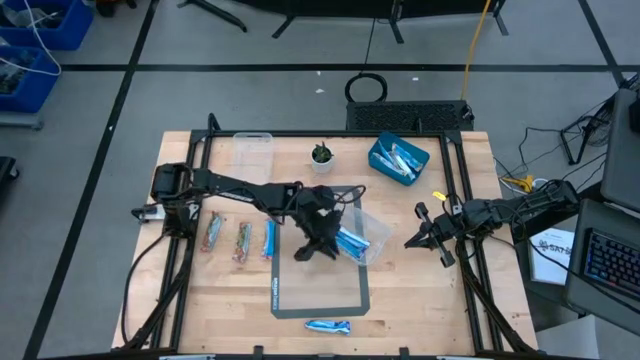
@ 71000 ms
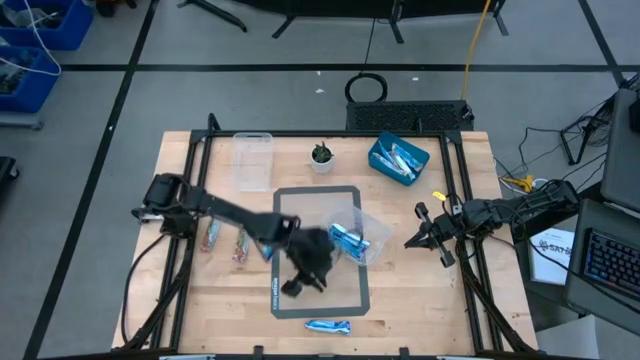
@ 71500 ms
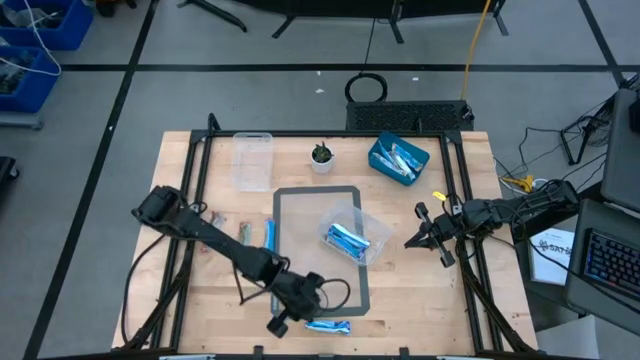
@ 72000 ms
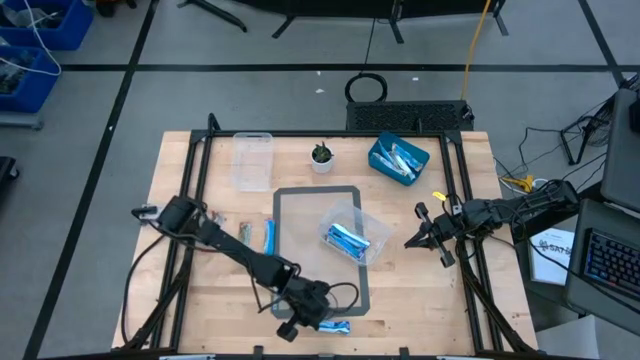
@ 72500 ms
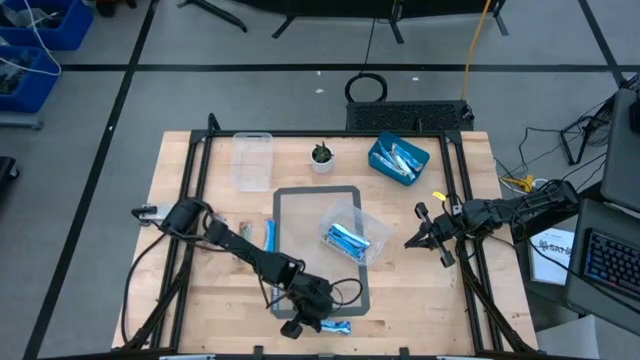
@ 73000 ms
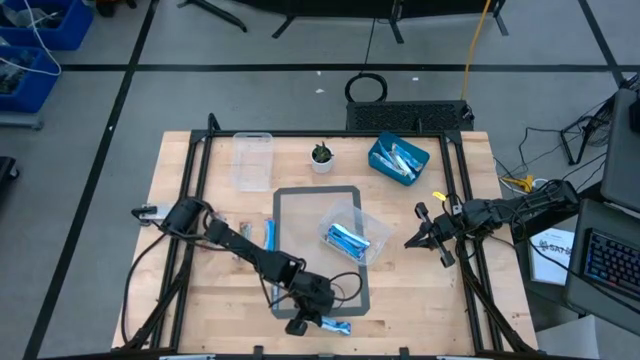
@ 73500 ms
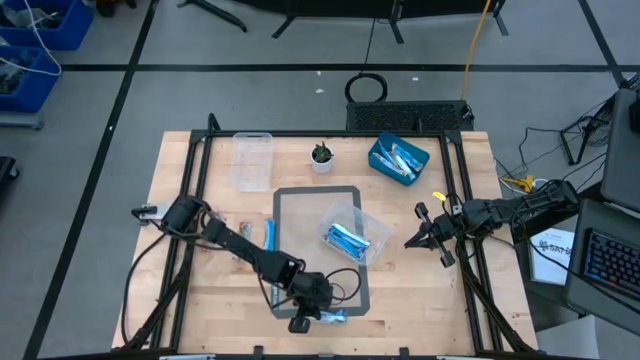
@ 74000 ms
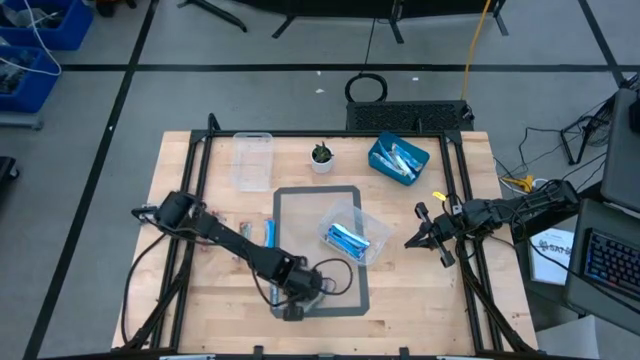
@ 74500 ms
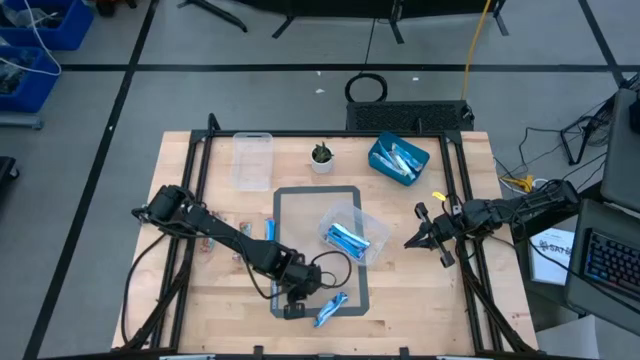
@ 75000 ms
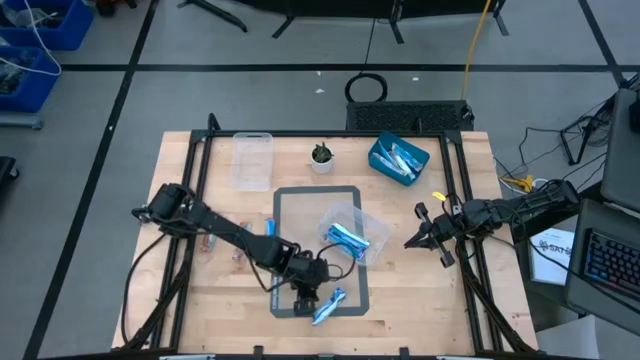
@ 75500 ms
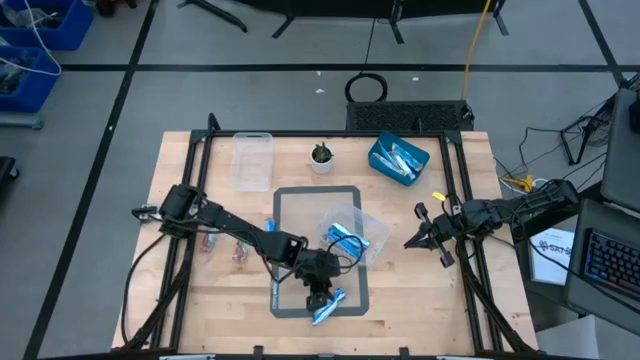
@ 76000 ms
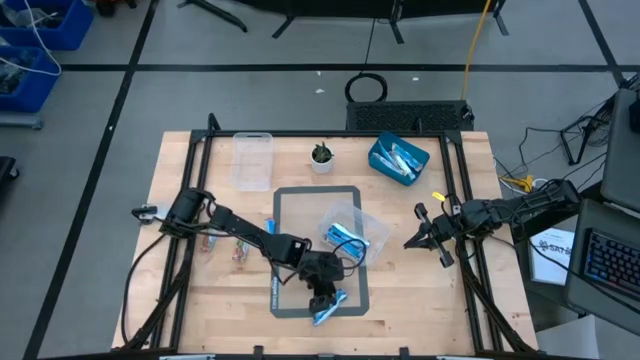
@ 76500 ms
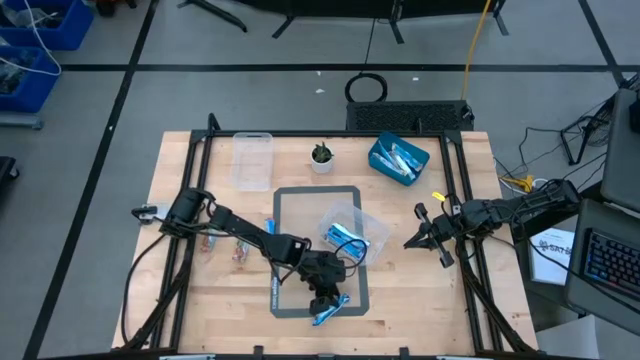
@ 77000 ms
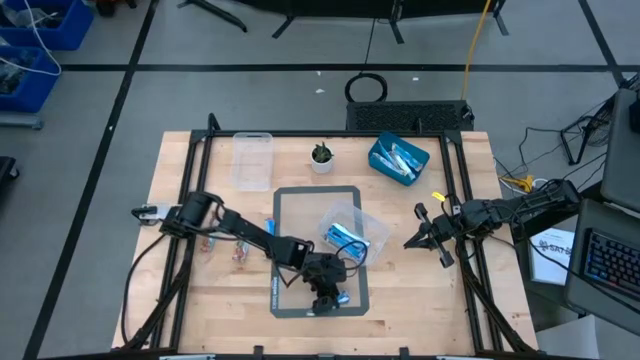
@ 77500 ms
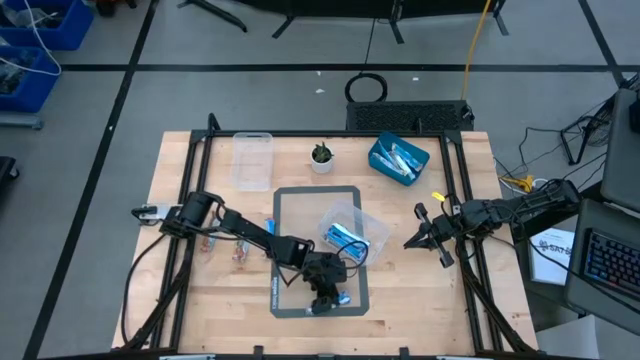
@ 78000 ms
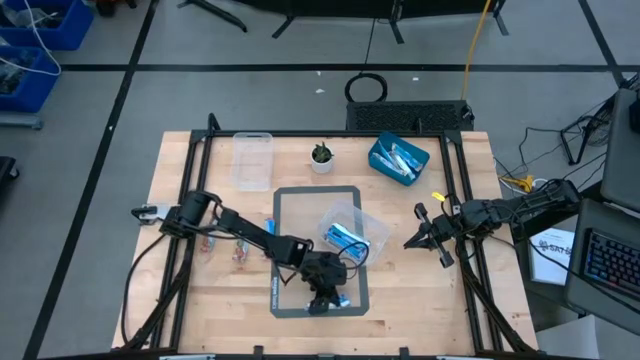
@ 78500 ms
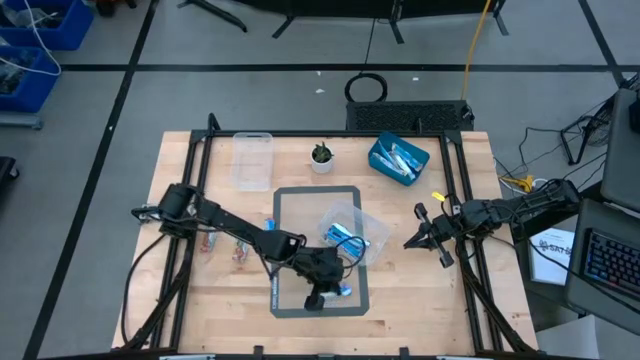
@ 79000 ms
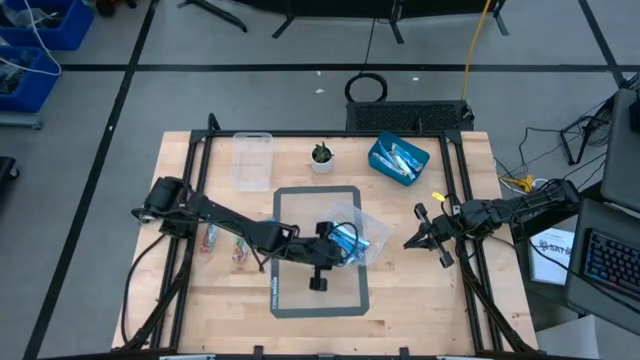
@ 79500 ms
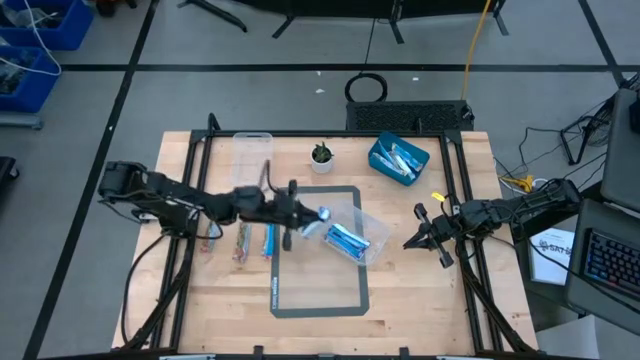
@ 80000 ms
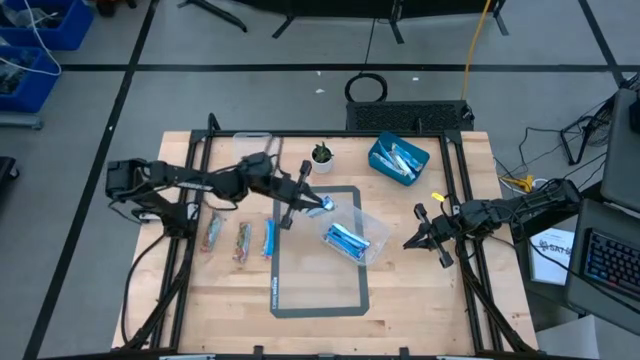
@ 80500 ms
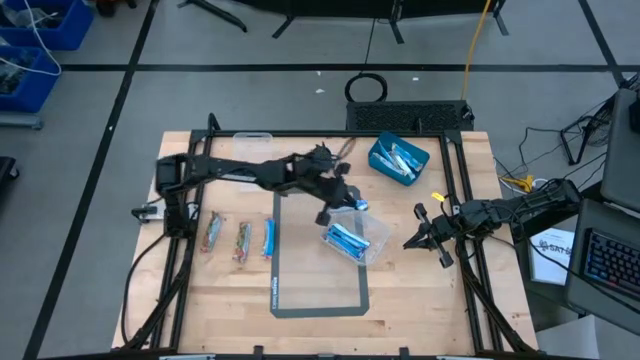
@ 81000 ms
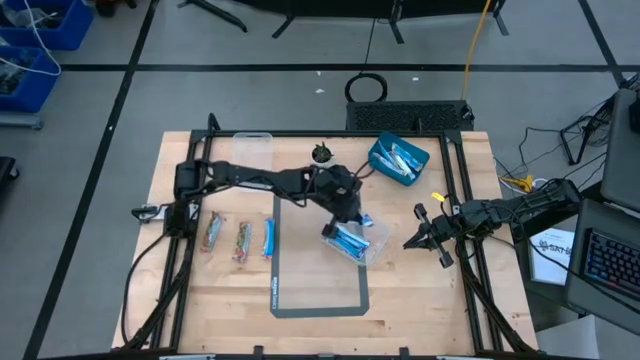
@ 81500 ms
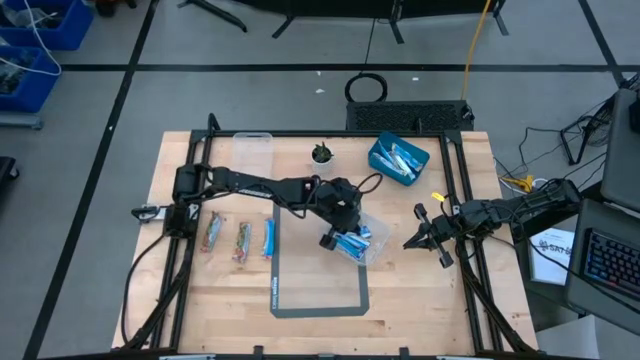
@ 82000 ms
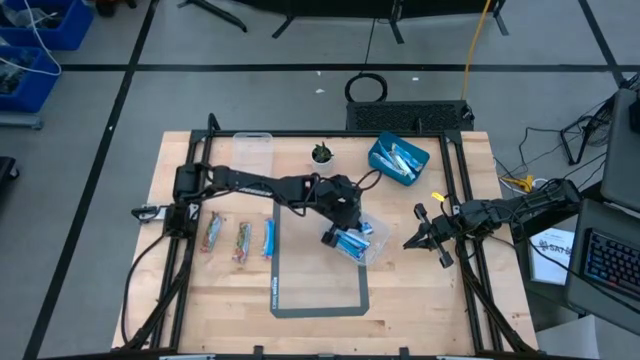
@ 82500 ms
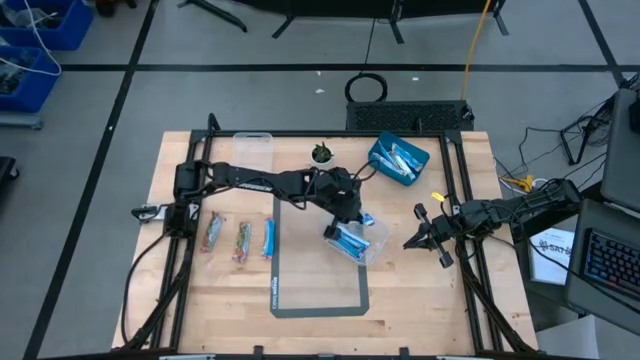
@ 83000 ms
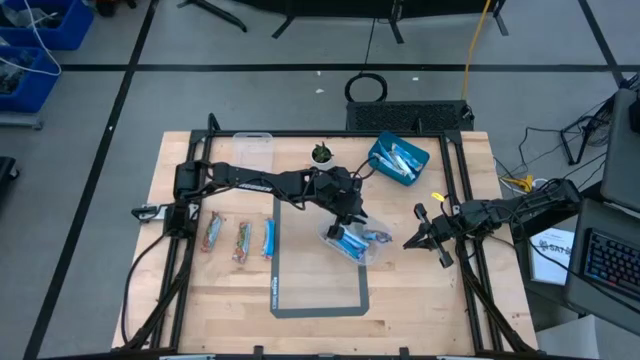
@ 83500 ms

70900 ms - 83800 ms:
Task: Pick and place Granola Bars by type
Put the snack into the center bin

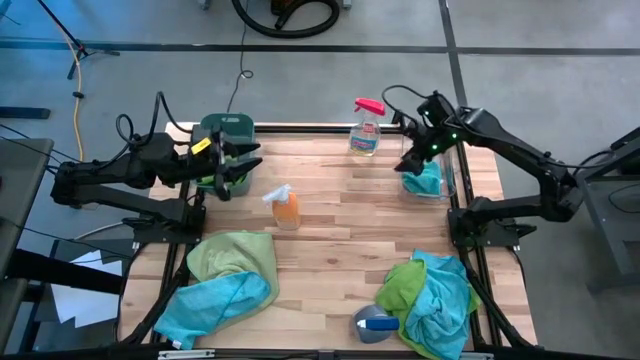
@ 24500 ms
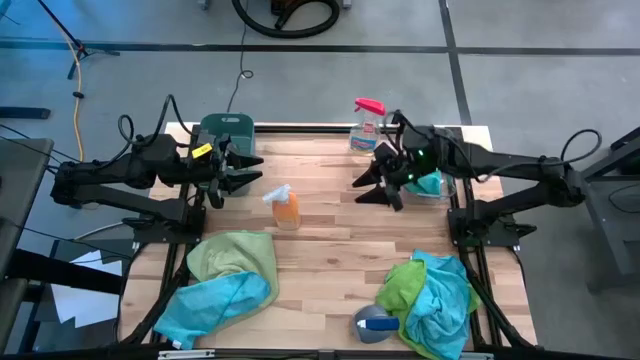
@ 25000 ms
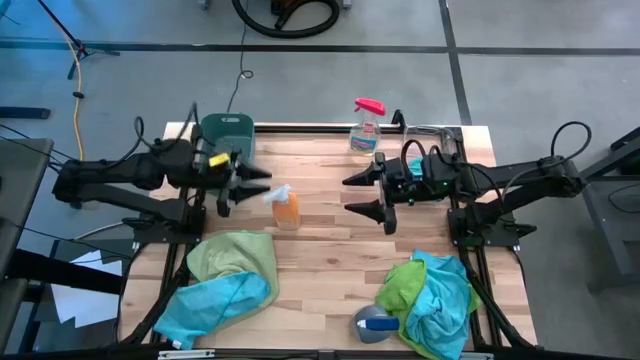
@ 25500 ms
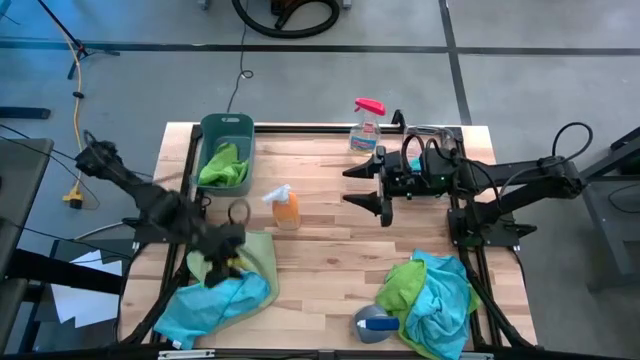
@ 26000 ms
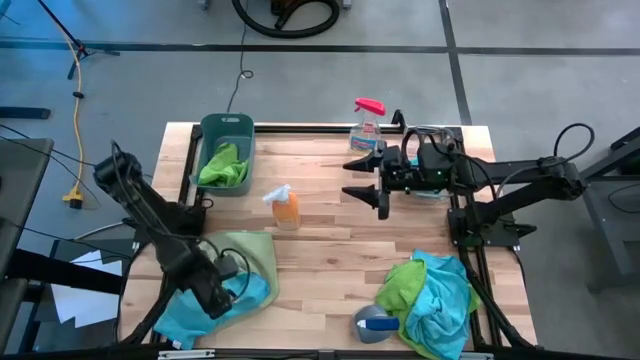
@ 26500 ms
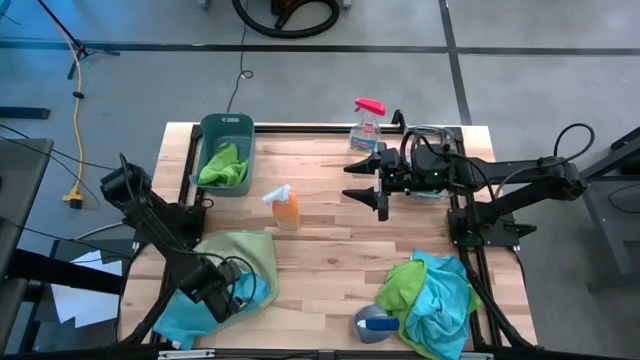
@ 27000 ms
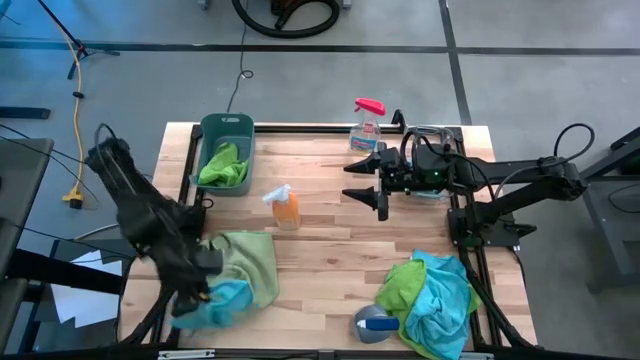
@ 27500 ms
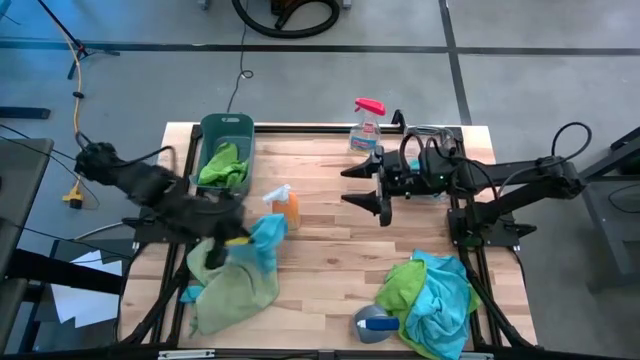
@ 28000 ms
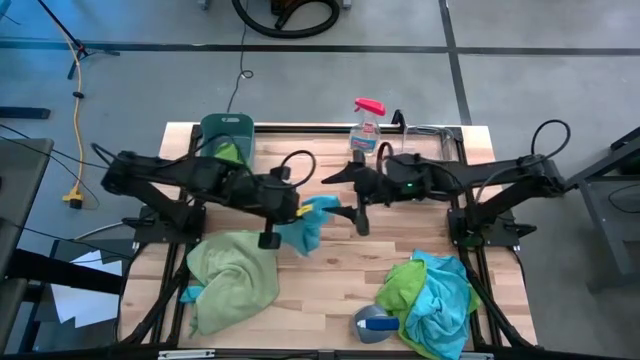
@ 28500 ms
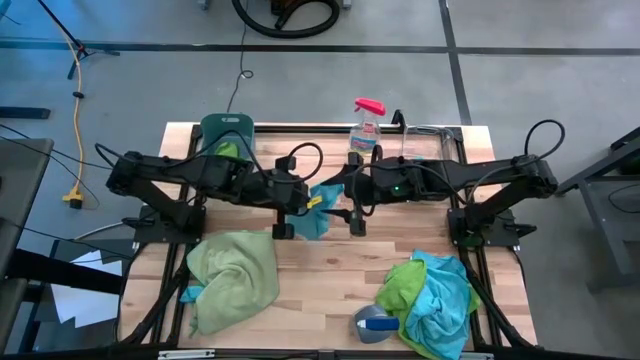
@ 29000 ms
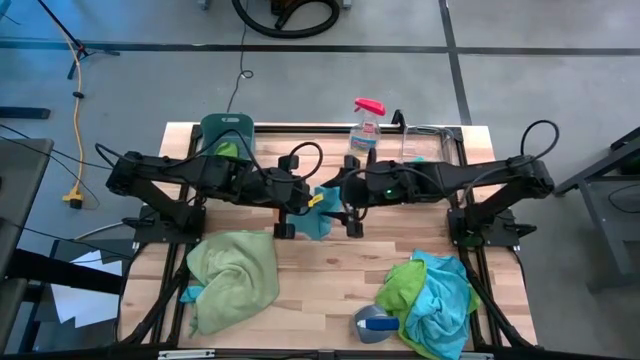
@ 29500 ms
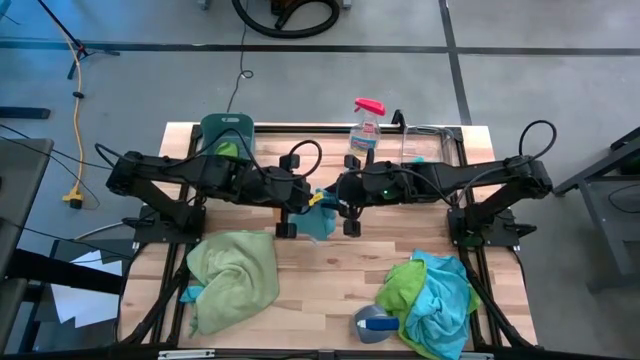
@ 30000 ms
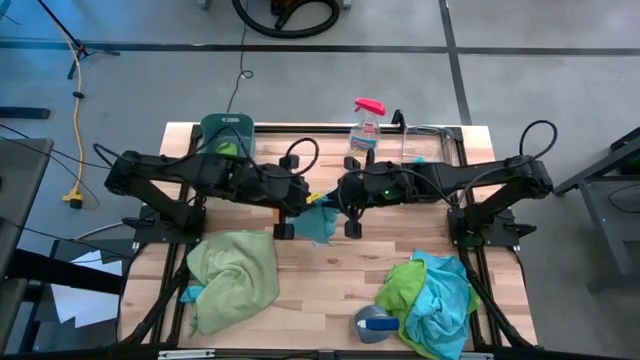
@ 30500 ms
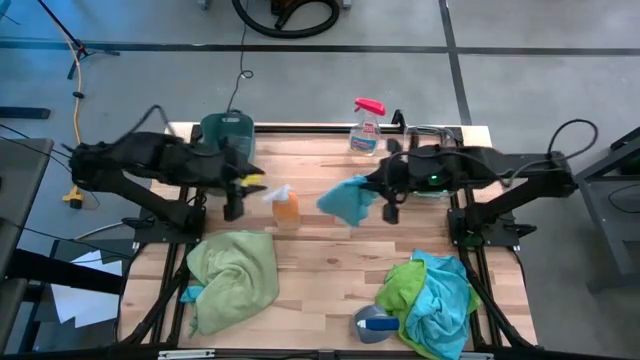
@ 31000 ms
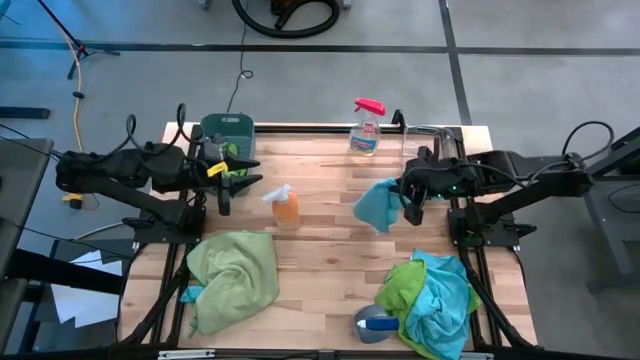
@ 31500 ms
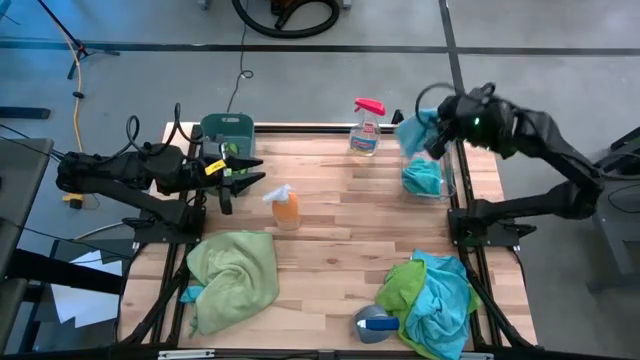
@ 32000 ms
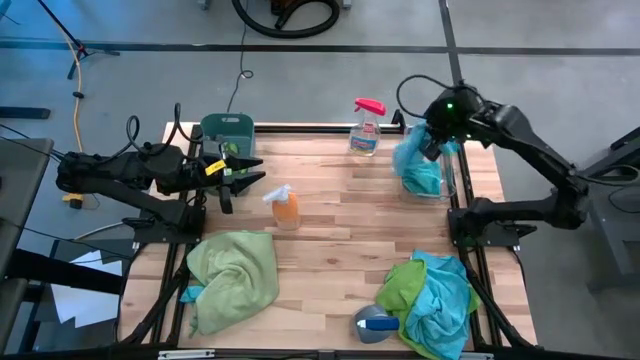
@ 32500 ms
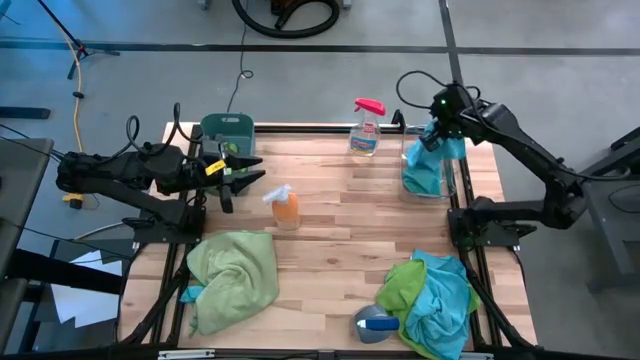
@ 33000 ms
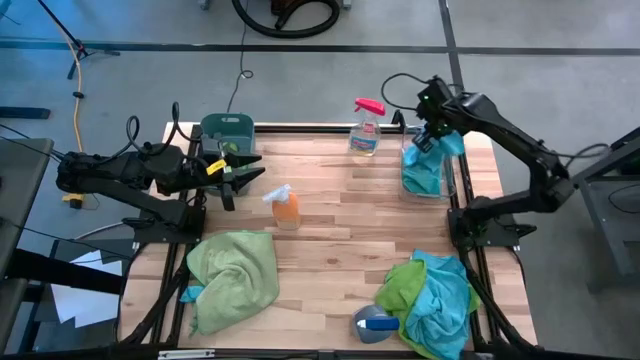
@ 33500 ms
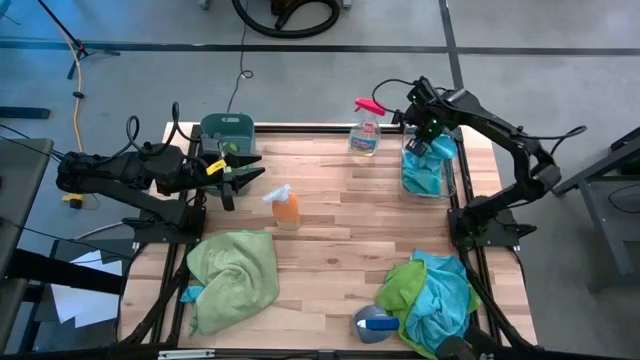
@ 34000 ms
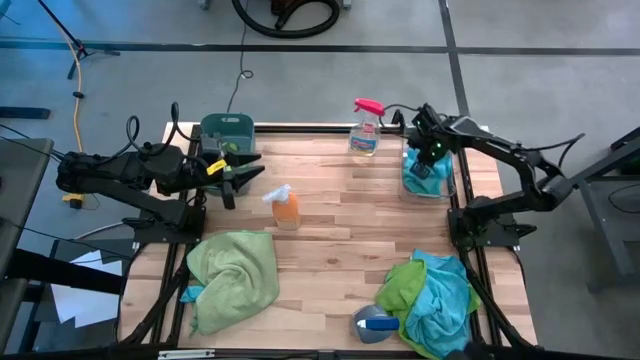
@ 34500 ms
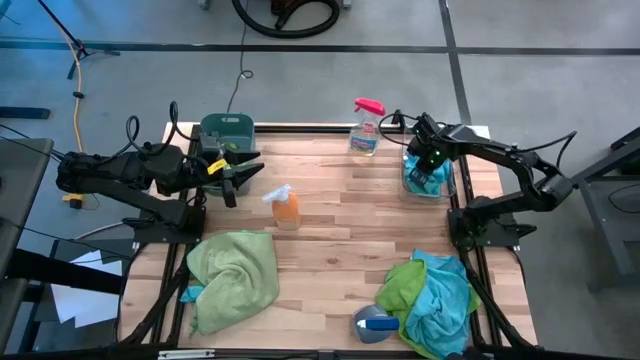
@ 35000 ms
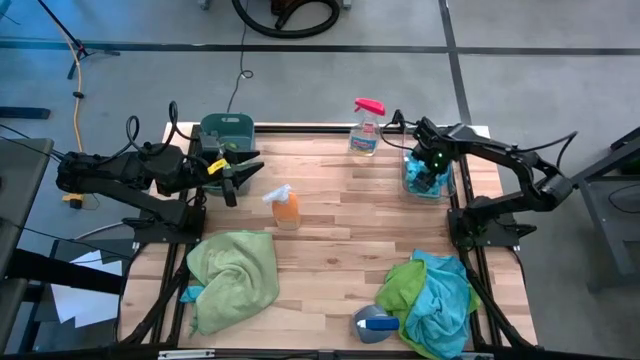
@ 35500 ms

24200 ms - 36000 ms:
Task: Sort microfiber towel by color & place in baskets
Put the blue microfiber towel into the transparent bin
